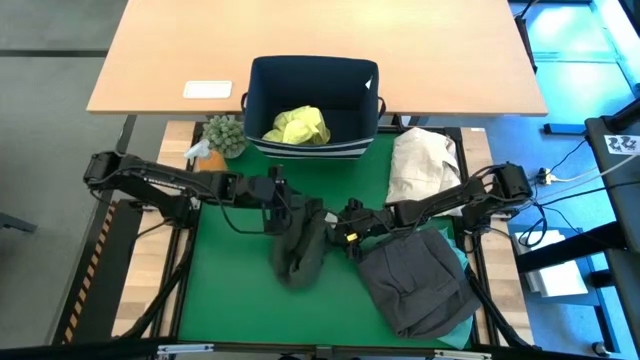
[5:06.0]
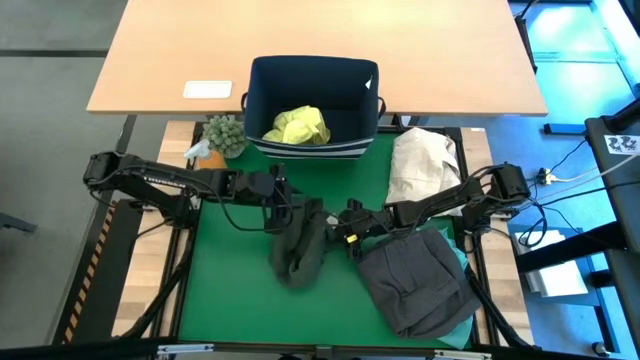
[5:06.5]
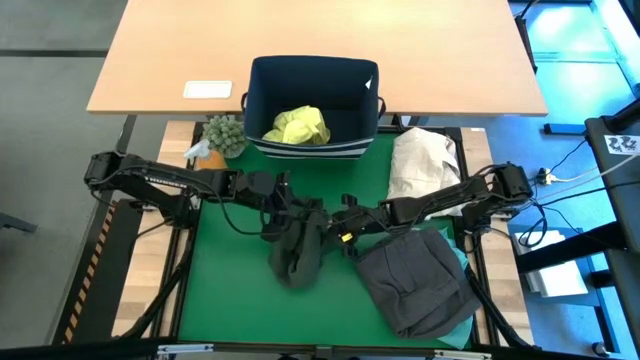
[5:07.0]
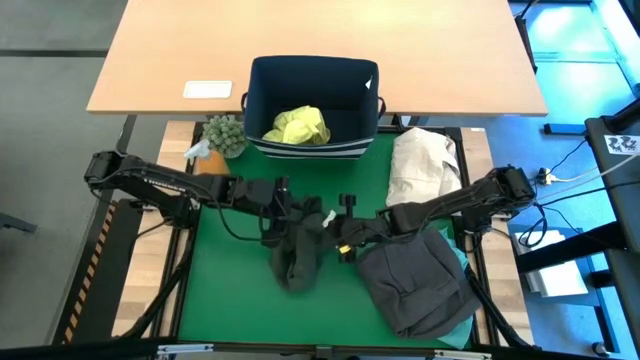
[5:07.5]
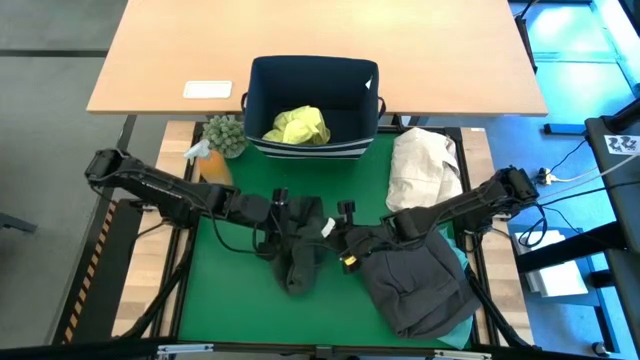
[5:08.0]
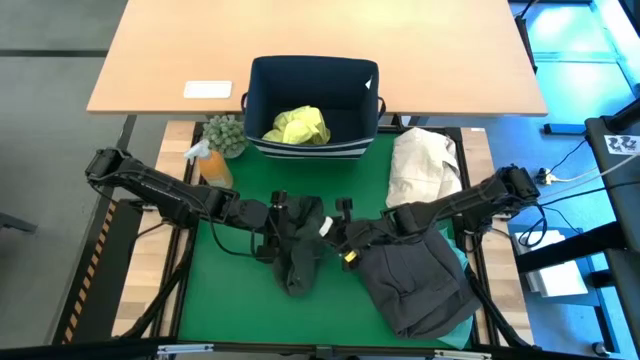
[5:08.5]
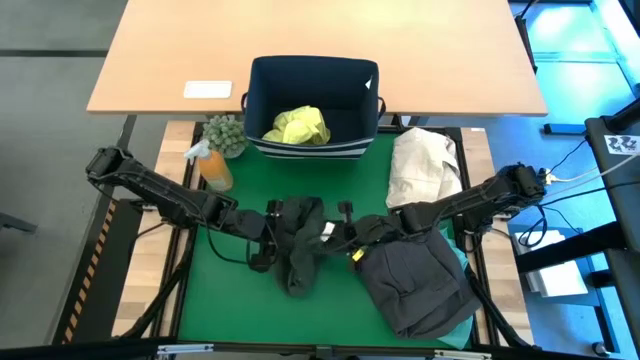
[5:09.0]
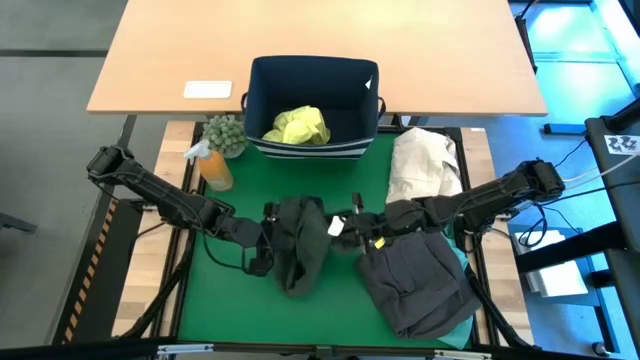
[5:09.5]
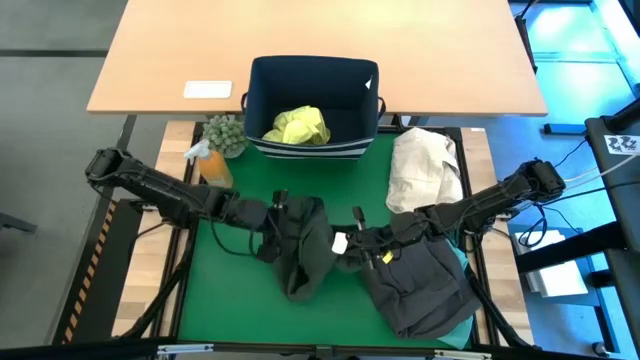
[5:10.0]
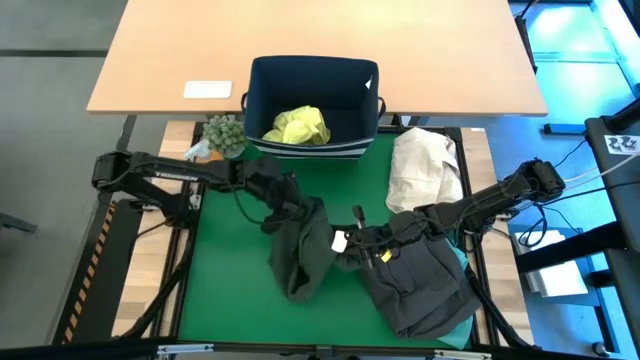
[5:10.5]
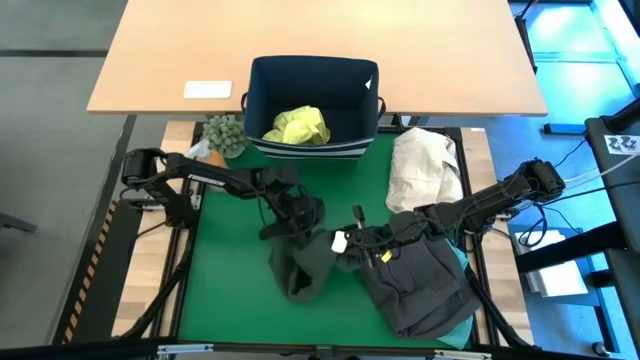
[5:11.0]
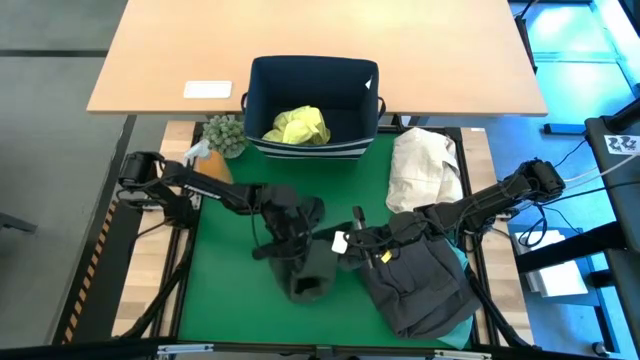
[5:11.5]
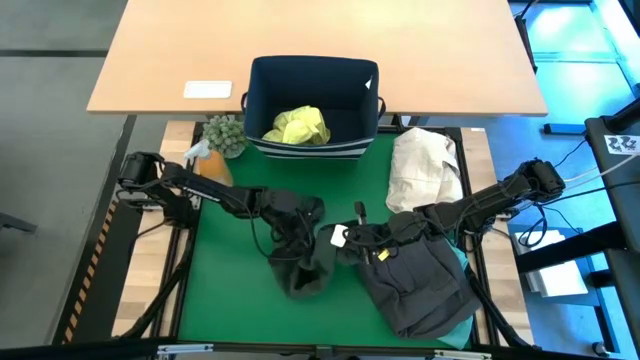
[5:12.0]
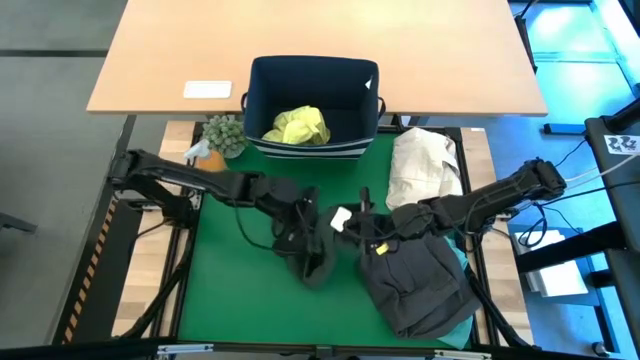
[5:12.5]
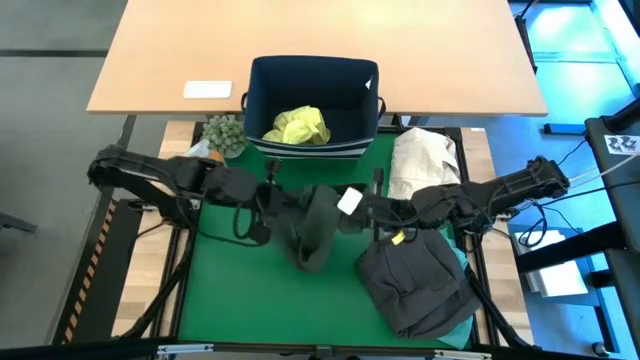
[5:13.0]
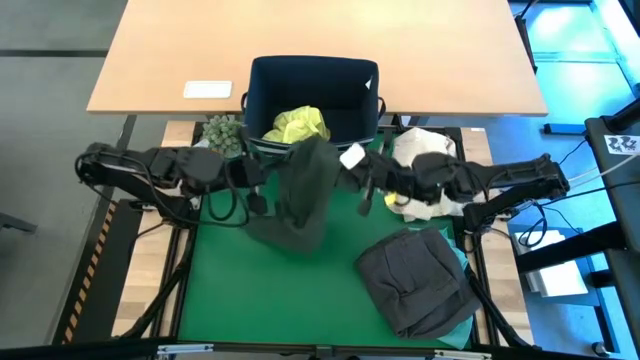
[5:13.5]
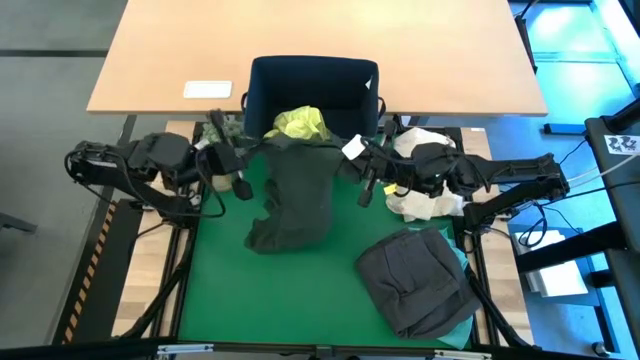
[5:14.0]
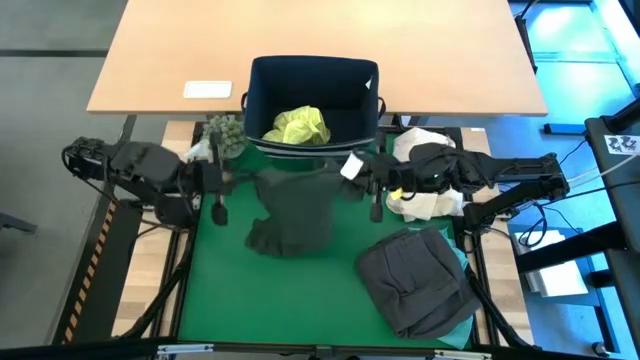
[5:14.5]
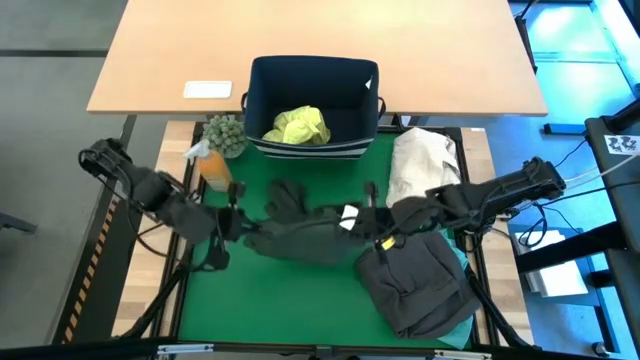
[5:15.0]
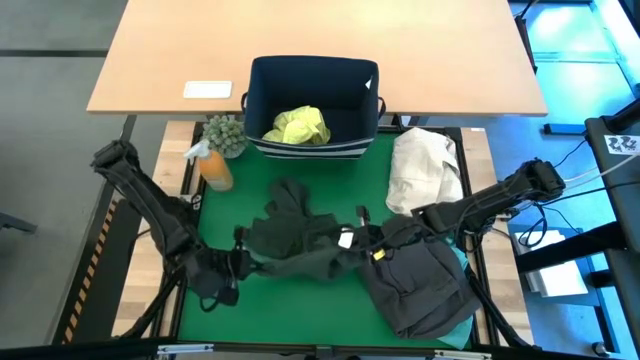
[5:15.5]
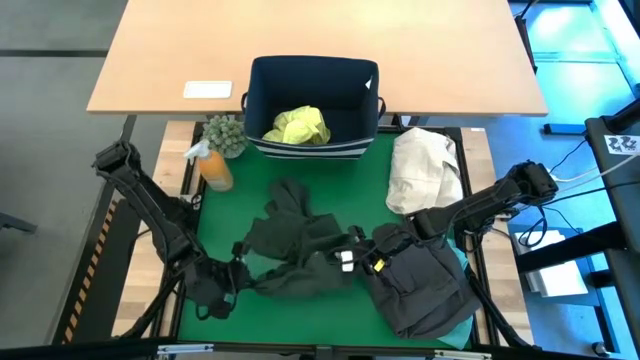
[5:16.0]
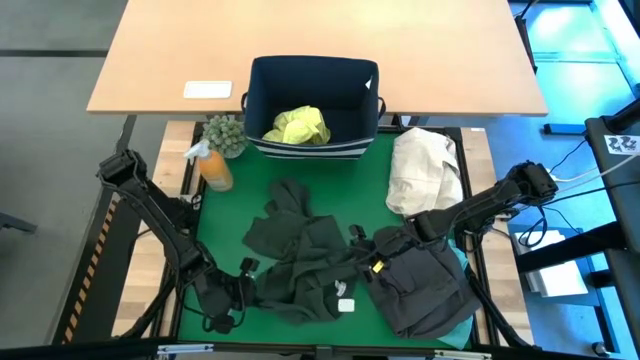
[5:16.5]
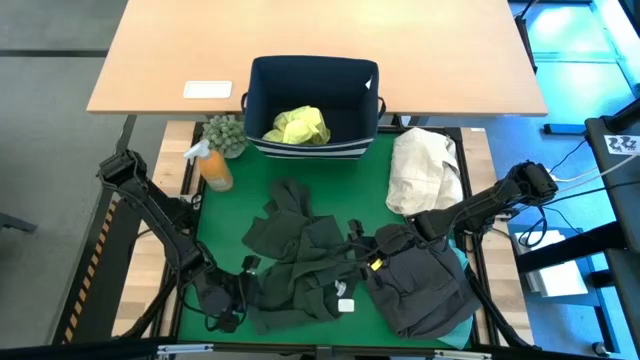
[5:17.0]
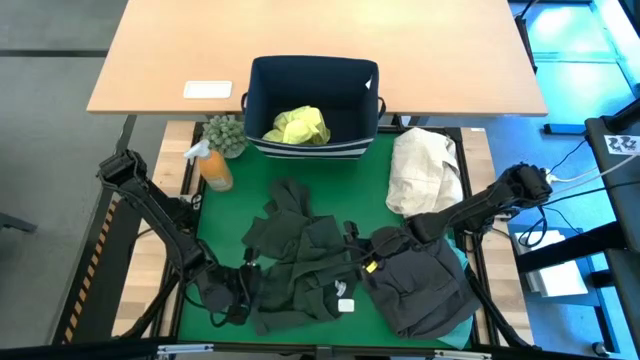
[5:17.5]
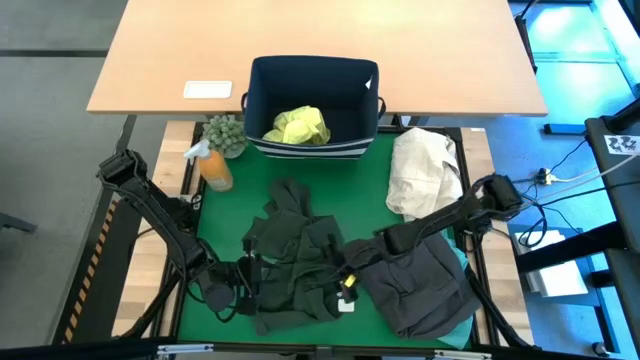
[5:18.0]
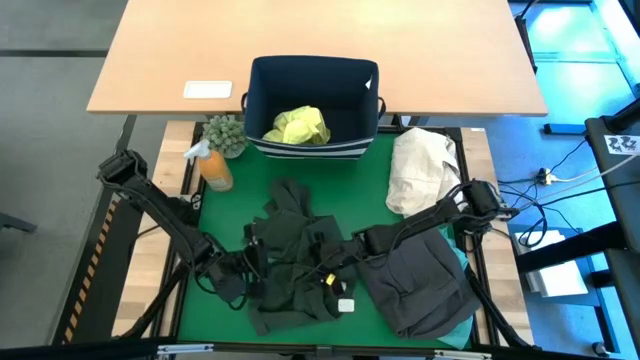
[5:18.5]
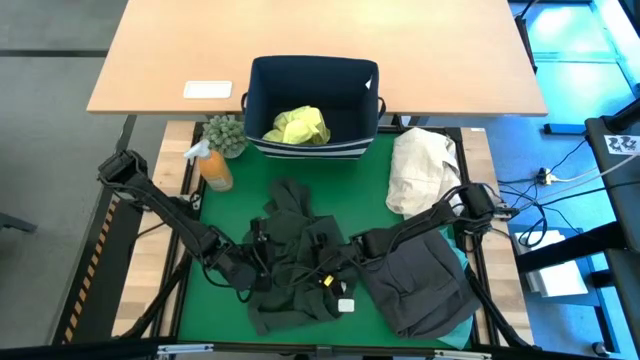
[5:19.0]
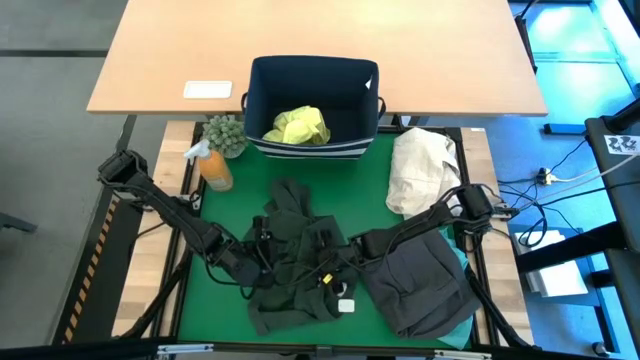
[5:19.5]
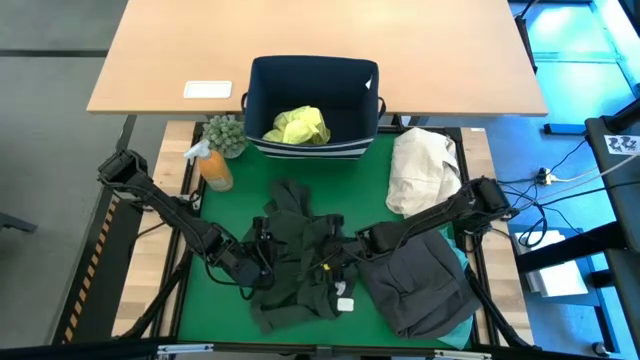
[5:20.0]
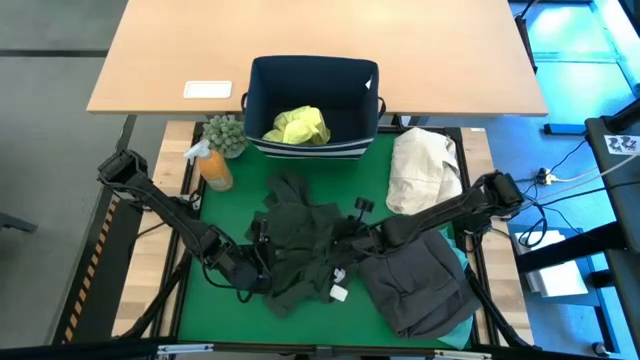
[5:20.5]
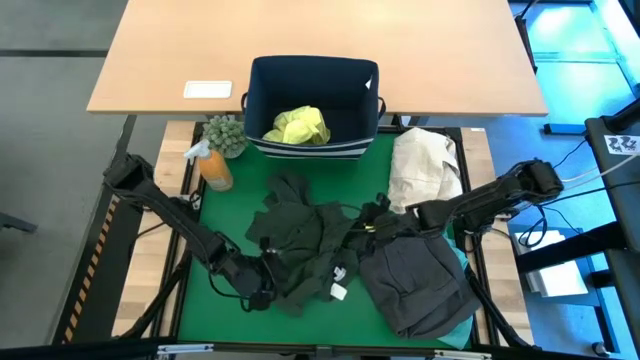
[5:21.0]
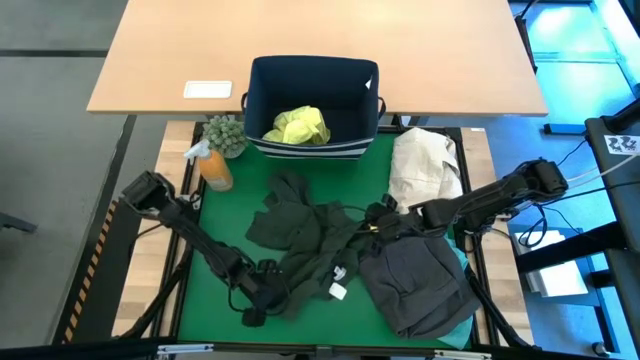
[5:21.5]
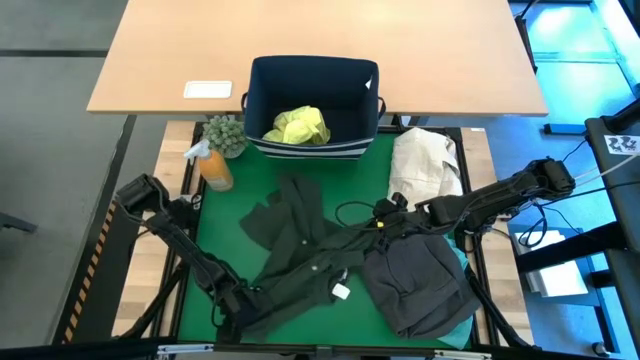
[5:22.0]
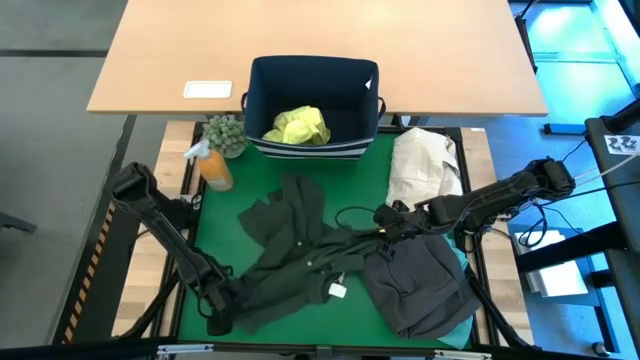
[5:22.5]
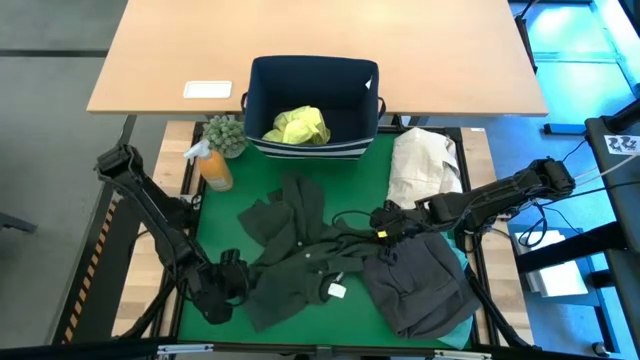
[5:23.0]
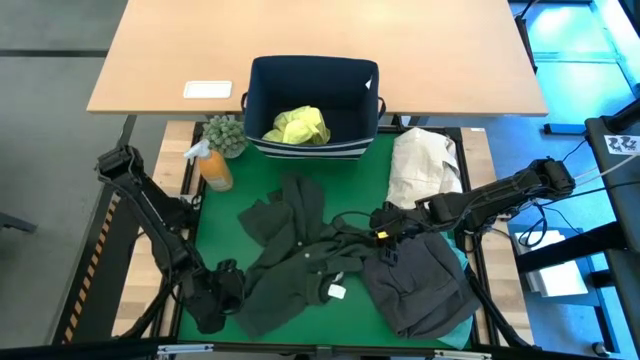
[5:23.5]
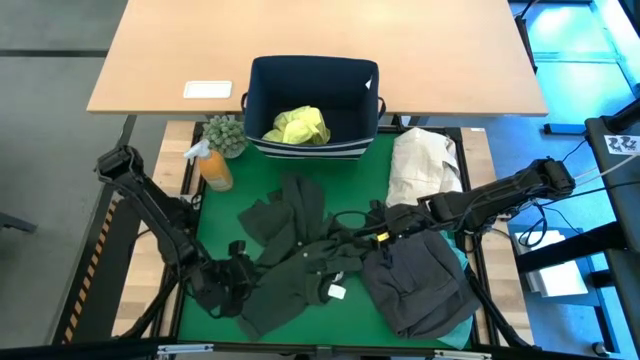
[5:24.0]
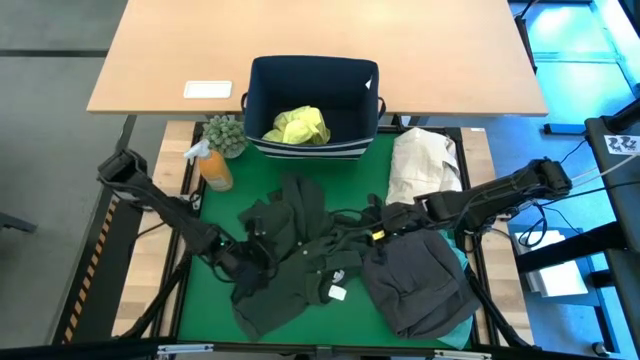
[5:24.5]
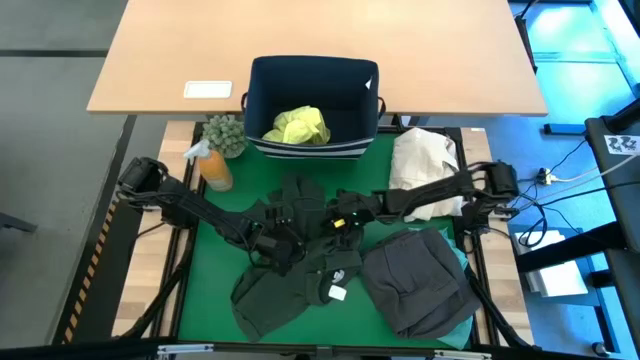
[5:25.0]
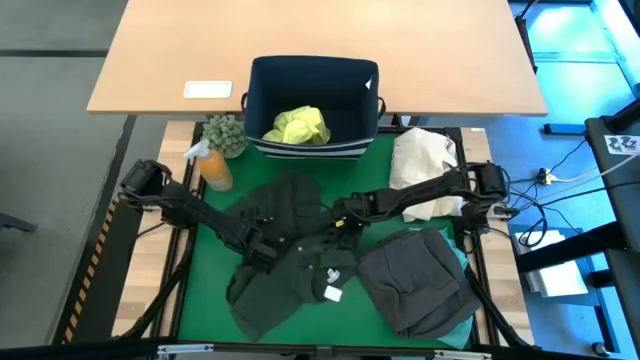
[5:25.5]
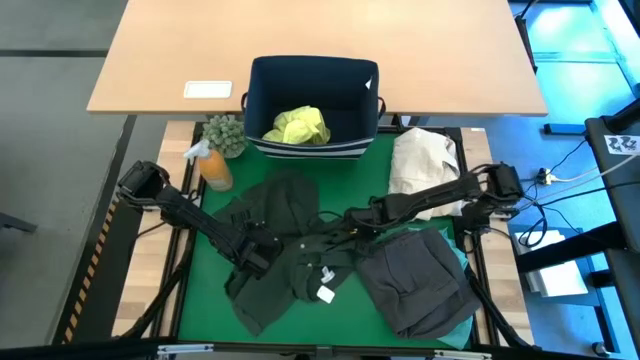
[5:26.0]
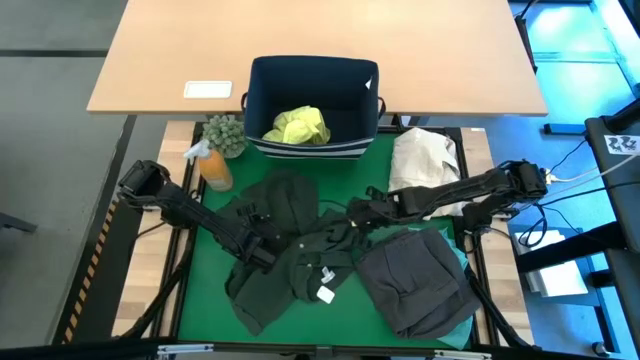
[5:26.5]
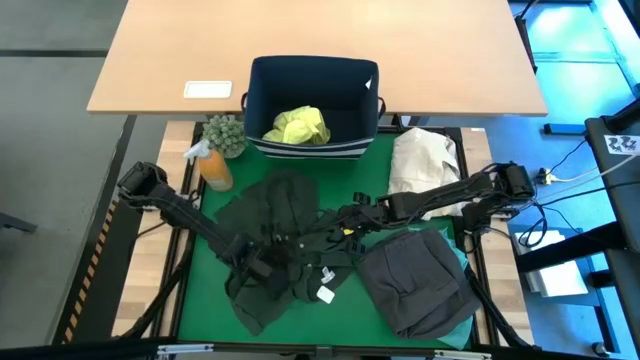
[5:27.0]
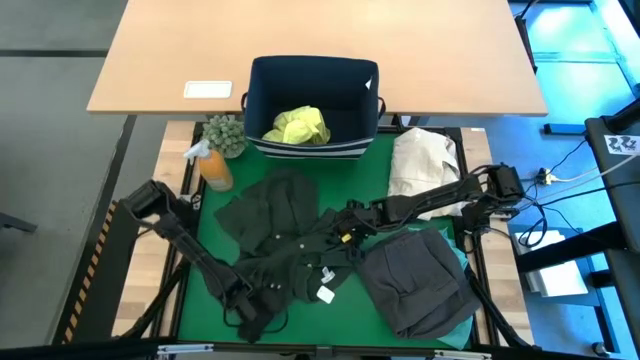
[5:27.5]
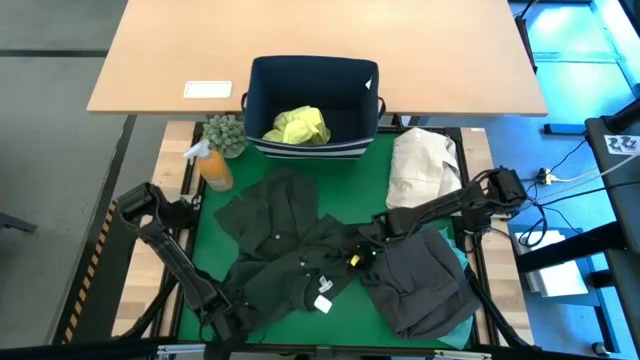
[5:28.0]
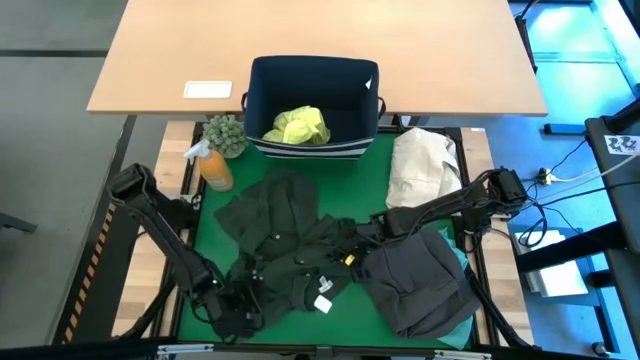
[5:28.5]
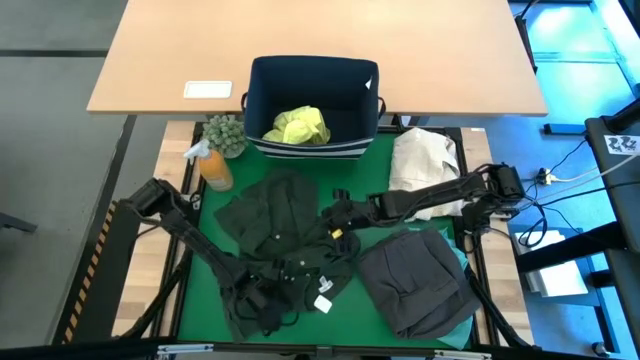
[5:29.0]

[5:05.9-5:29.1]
Task: Fold laundry
Fold the green polo shirt
